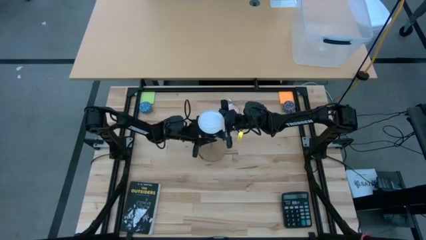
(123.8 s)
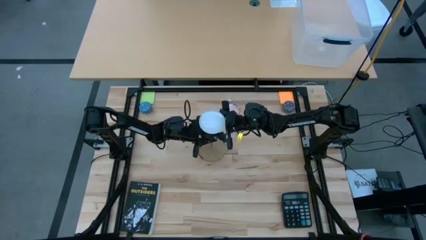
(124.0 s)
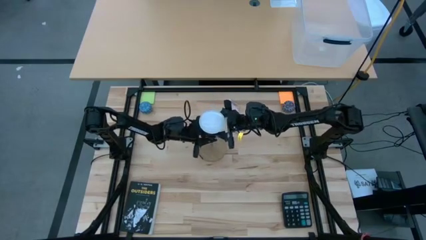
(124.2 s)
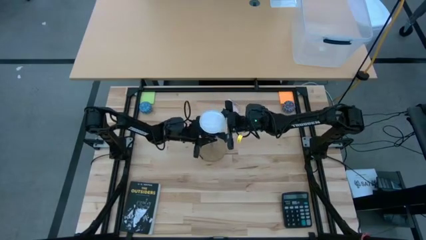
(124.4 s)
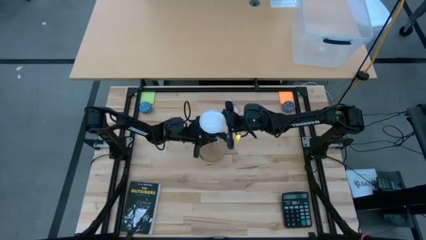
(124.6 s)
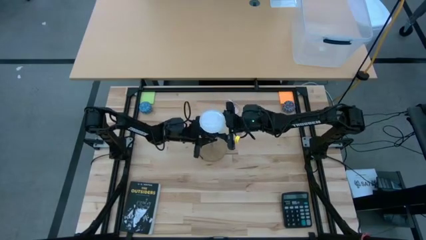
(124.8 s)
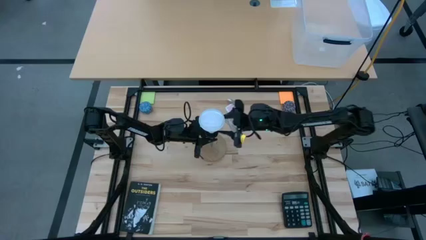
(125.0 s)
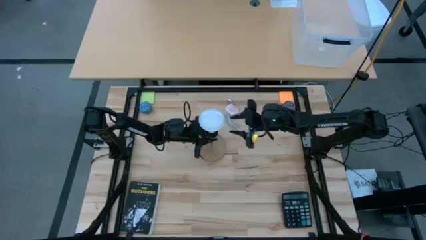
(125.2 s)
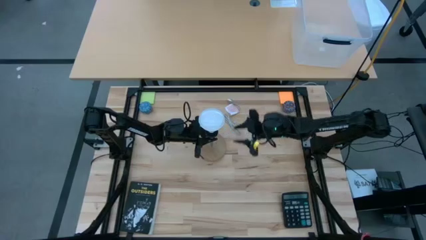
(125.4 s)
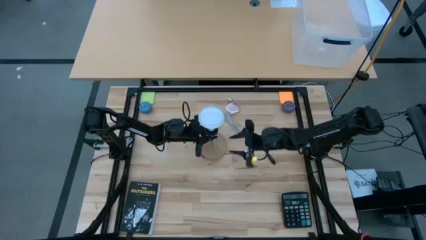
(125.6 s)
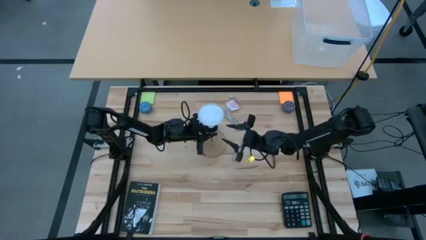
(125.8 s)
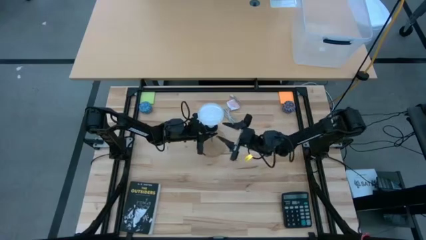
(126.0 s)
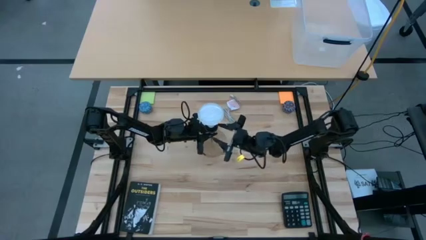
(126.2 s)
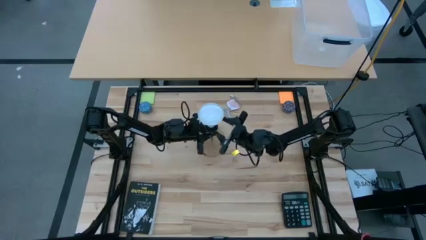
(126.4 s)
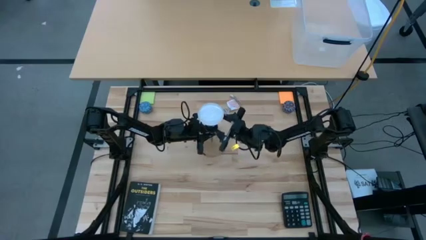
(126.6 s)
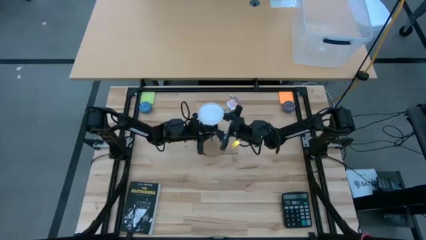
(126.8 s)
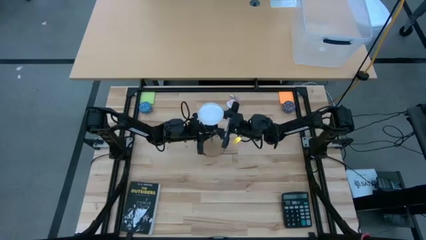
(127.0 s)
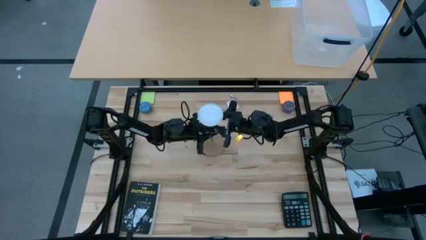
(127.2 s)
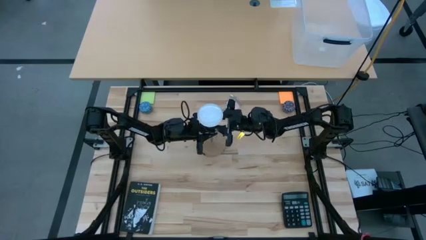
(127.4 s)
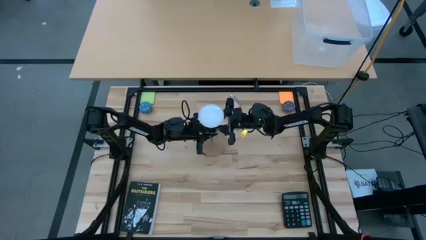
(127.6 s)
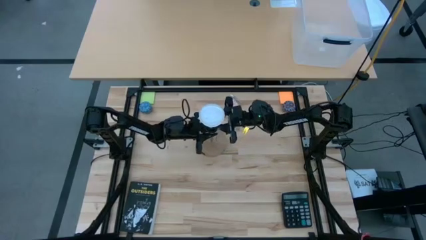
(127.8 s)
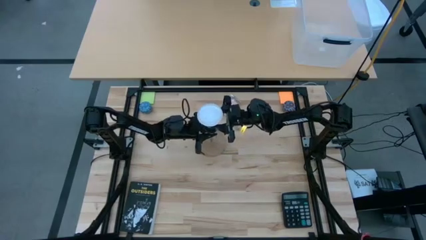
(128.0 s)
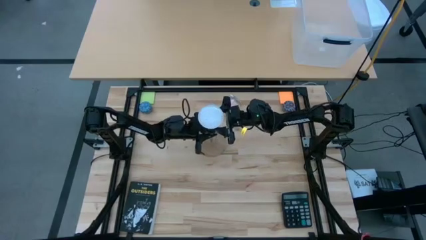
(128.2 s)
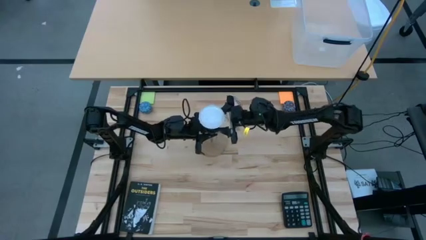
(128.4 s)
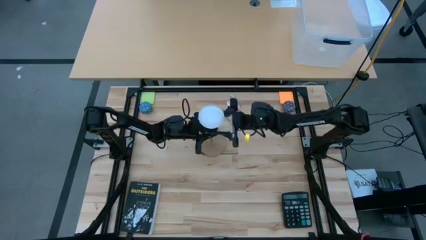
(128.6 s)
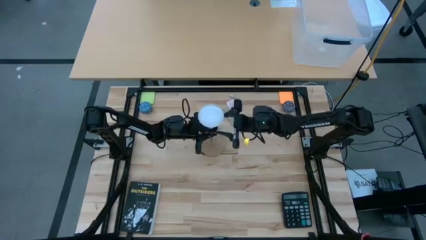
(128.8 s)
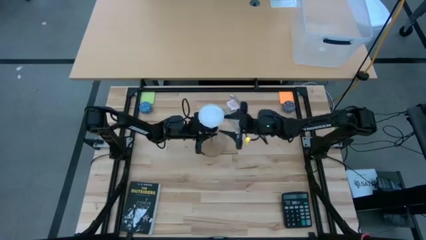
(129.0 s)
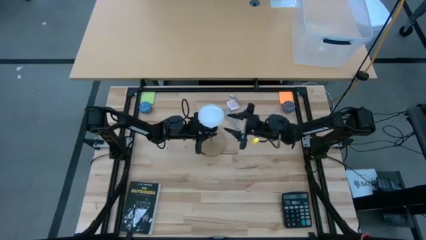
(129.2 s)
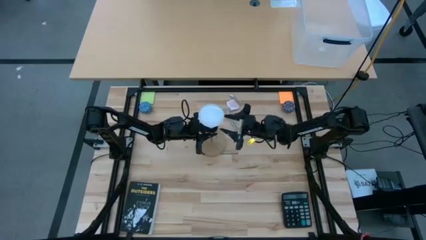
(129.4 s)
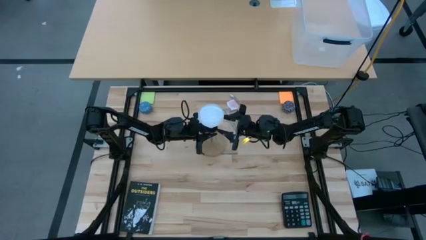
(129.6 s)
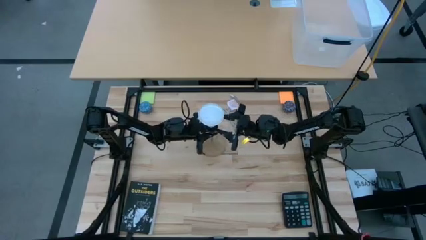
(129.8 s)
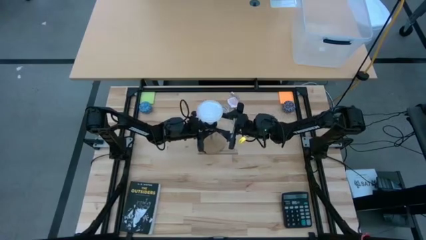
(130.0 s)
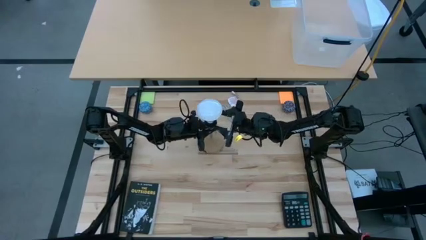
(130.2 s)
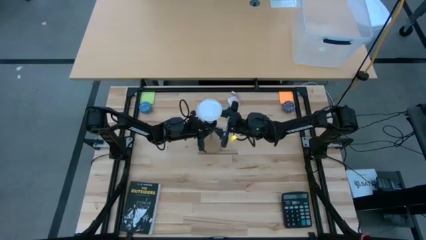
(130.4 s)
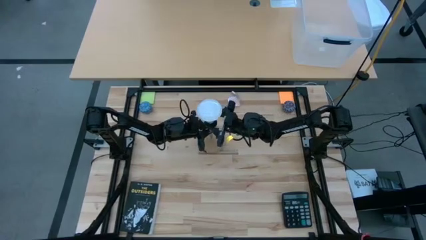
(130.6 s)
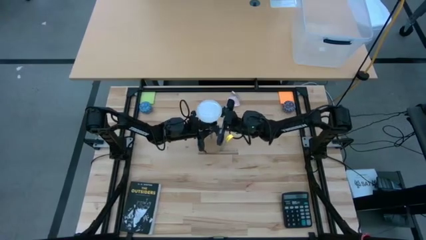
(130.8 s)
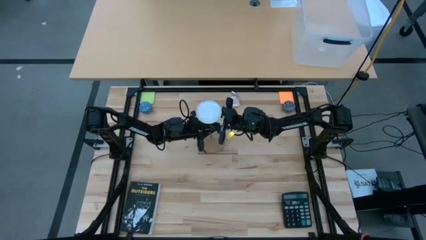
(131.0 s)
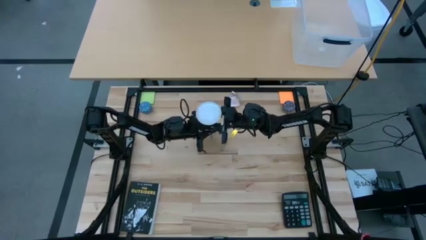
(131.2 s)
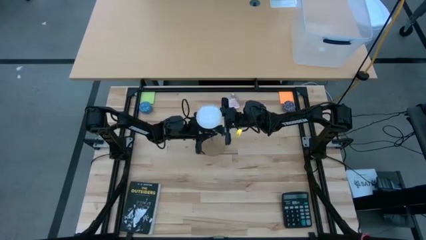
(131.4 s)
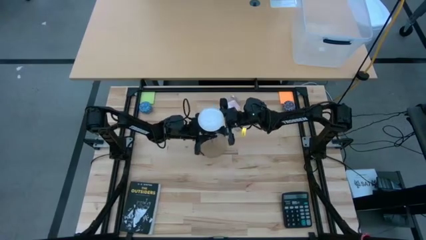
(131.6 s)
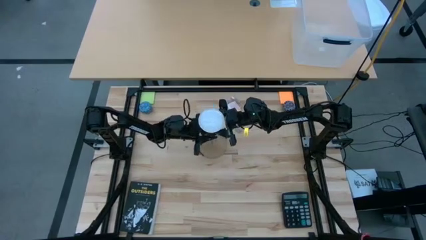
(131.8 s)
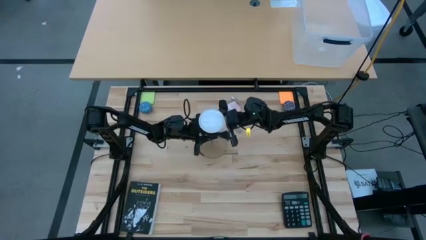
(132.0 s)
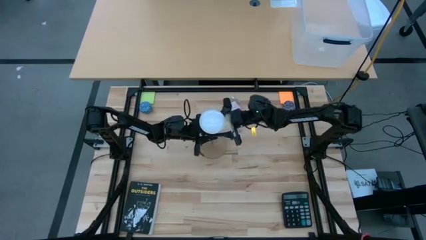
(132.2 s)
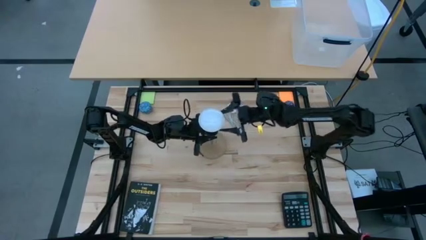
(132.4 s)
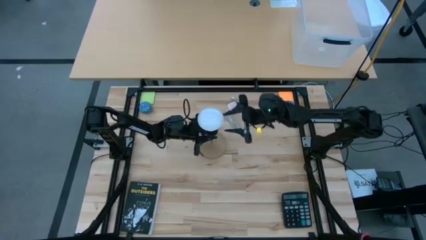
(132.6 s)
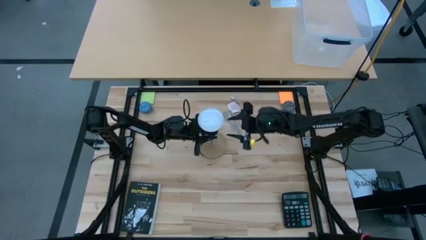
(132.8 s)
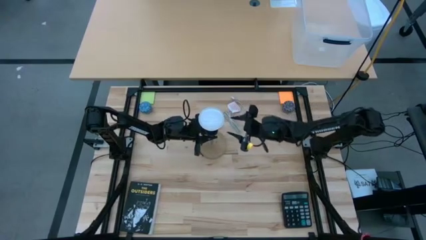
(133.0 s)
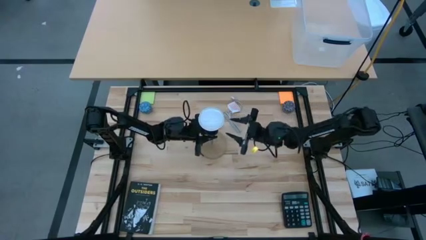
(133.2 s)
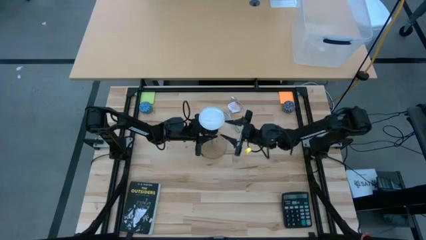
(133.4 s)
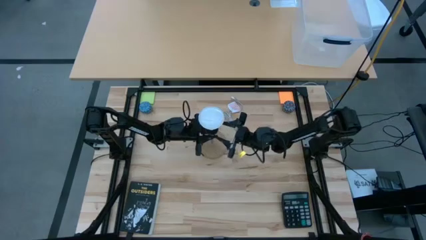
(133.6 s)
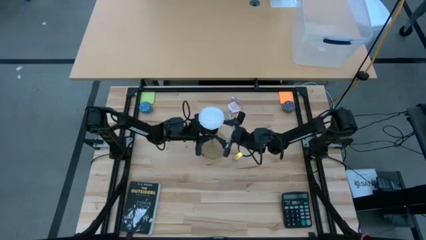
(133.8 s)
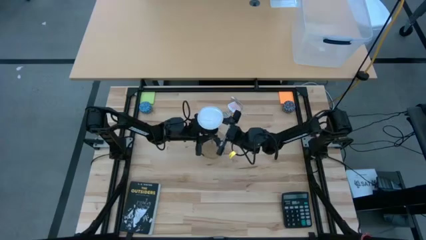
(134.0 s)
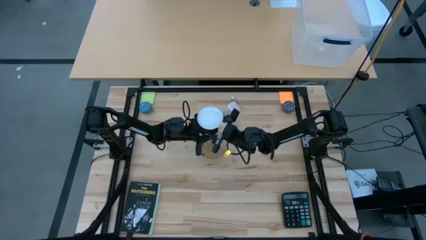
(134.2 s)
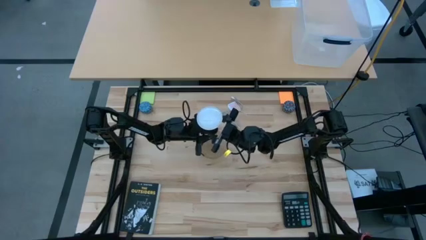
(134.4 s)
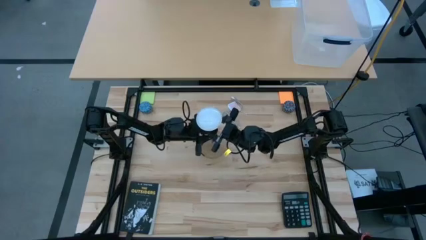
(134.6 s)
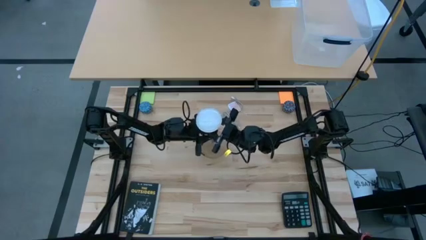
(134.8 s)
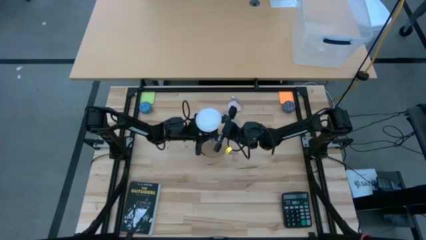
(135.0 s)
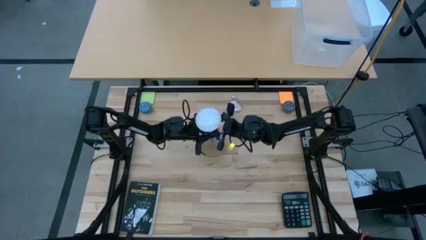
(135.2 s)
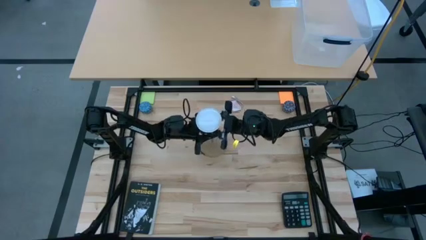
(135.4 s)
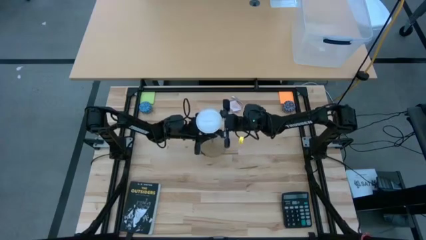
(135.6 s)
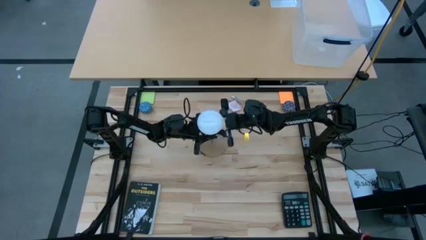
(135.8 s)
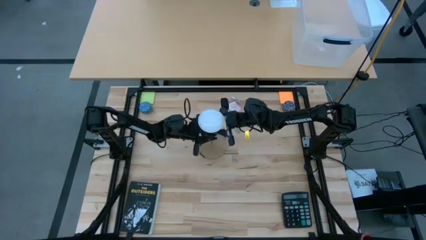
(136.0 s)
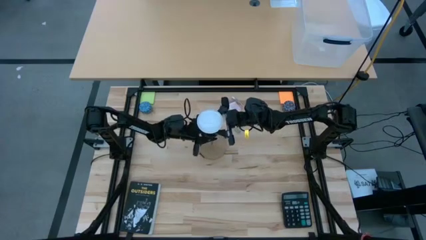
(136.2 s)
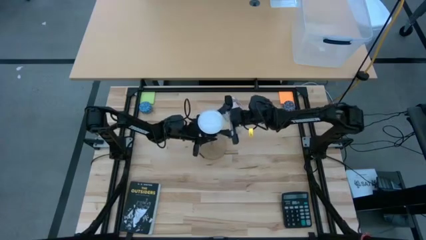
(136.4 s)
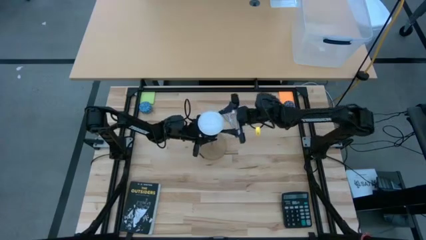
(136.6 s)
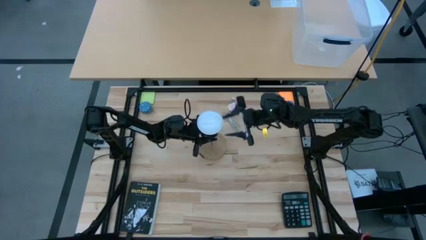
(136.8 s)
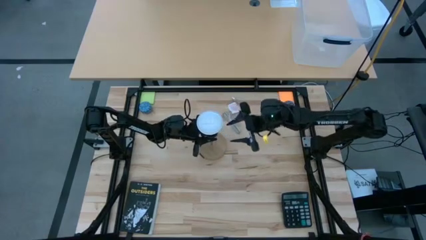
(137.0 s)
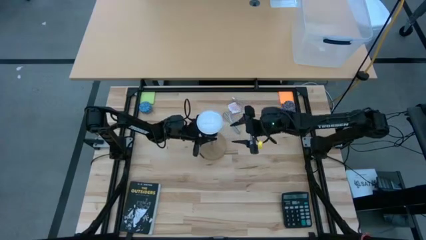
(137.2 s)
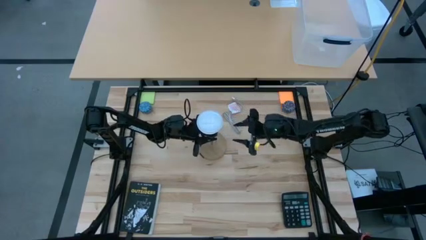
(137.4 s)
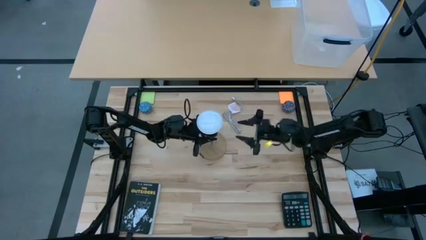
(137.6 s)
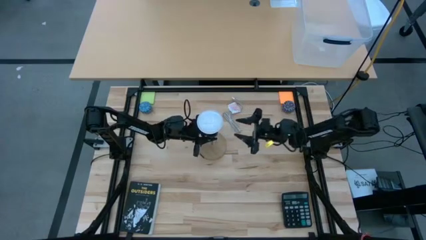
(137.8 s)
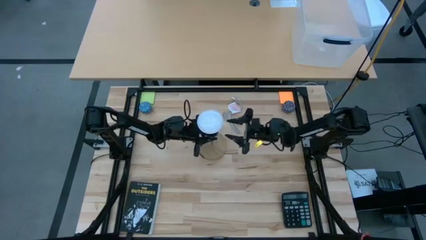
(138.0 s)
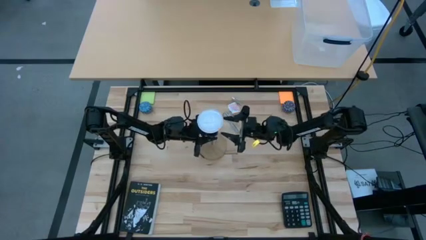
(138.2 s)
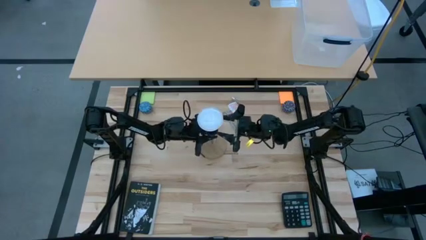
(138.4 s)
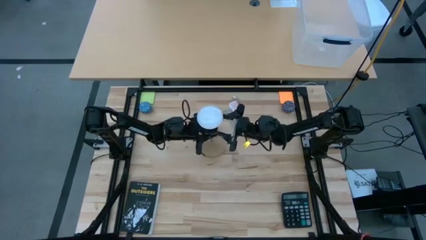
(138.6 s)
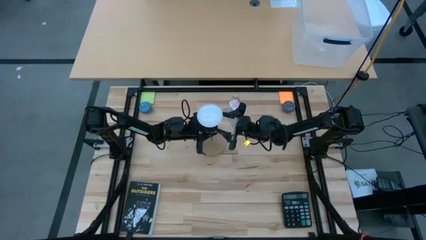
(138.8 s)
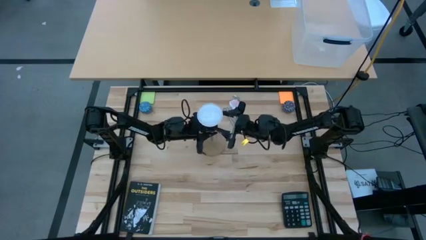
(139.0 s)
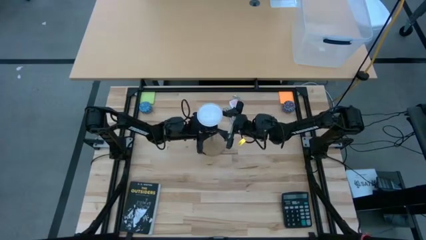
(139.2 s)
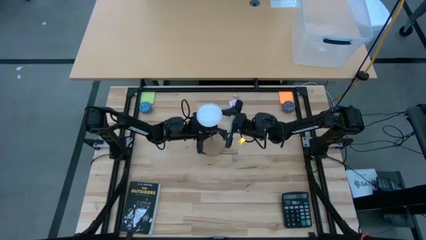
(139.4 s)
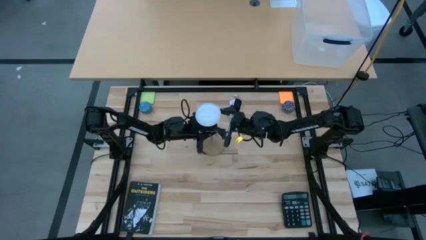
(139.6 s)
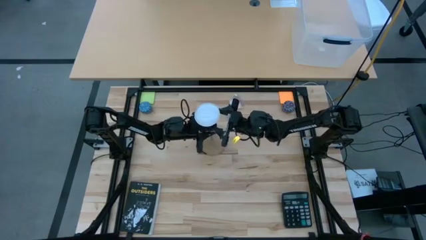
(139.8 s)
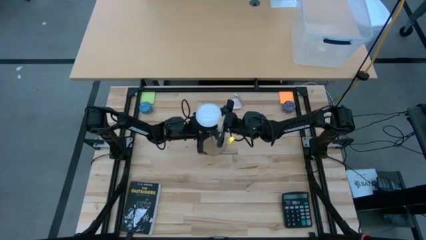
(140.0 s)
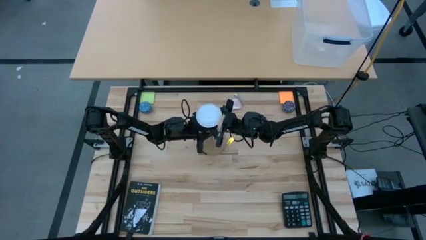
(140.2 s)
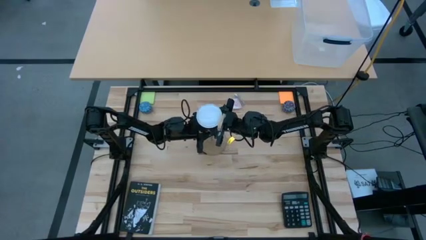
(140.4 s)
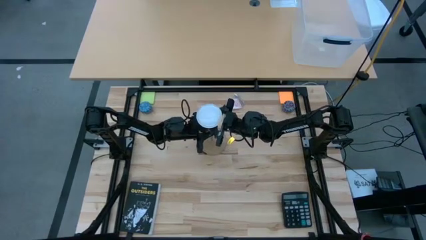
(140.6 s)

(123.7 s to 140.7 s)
Task: Screw lightbulb
Remove the lightbulb from the lamp
